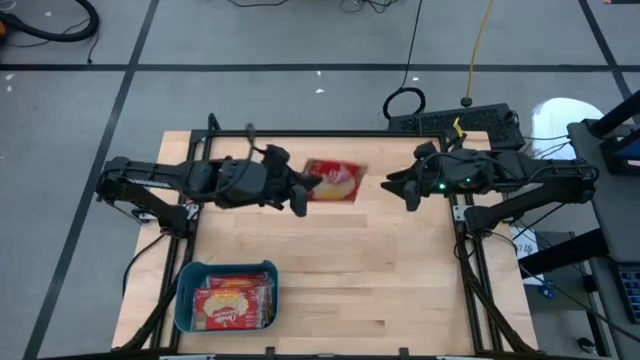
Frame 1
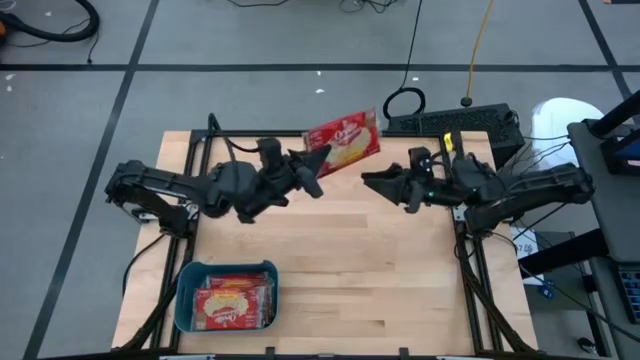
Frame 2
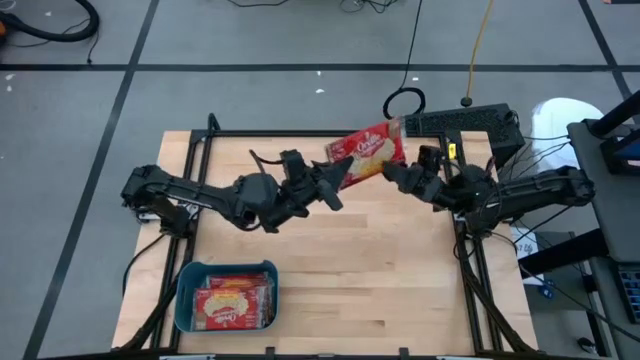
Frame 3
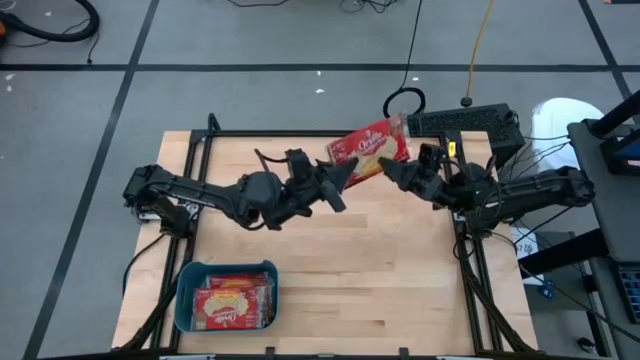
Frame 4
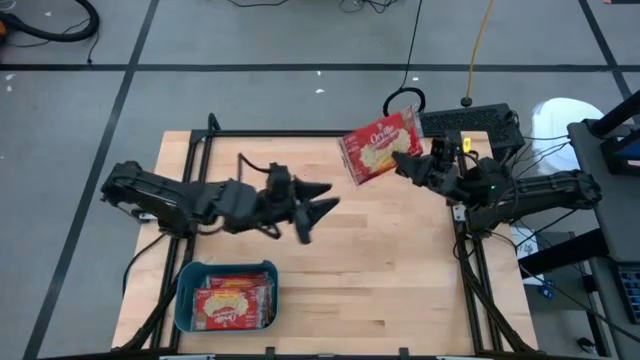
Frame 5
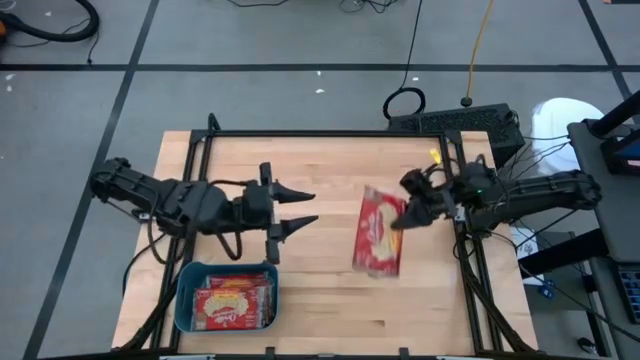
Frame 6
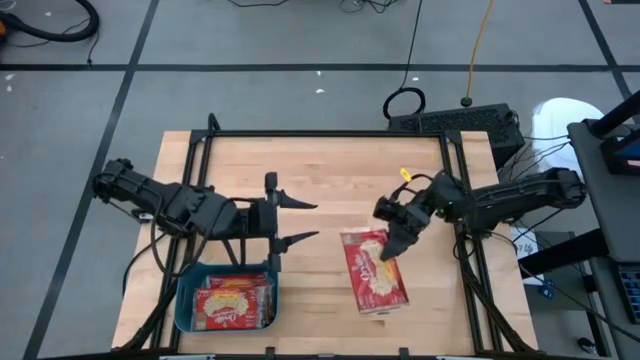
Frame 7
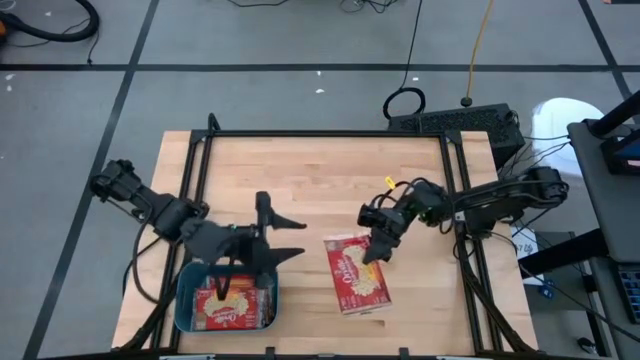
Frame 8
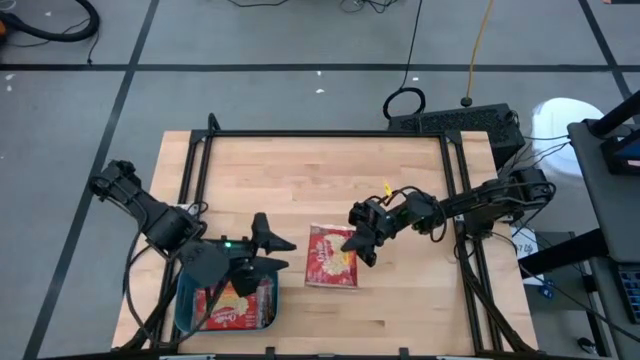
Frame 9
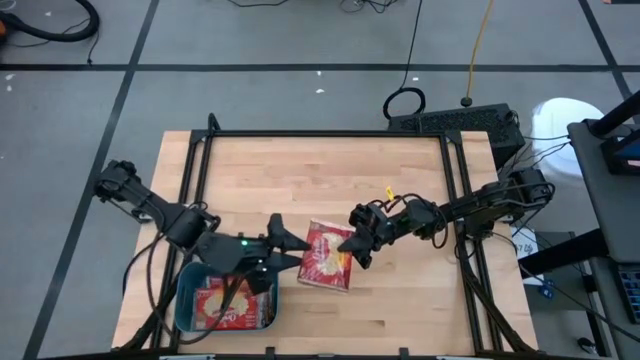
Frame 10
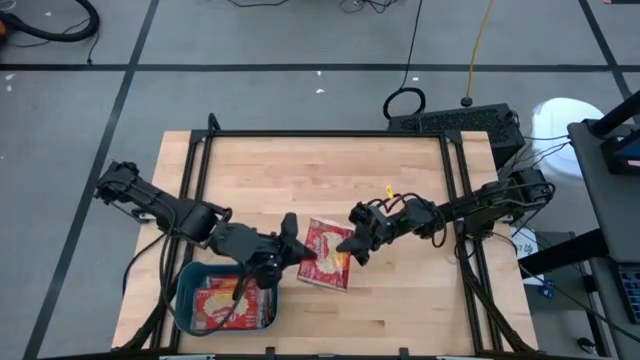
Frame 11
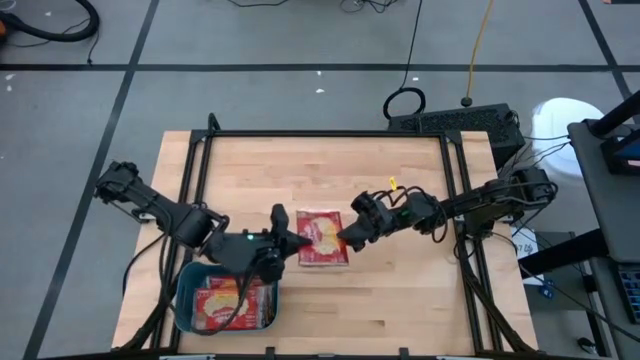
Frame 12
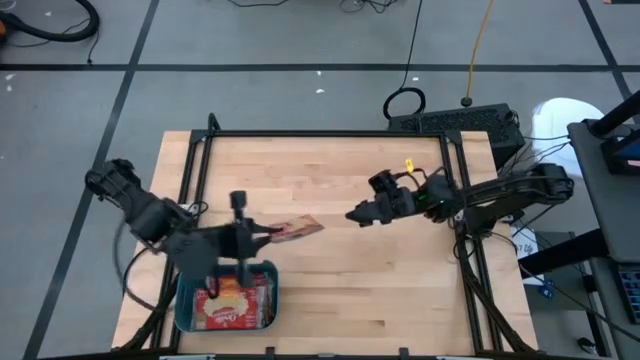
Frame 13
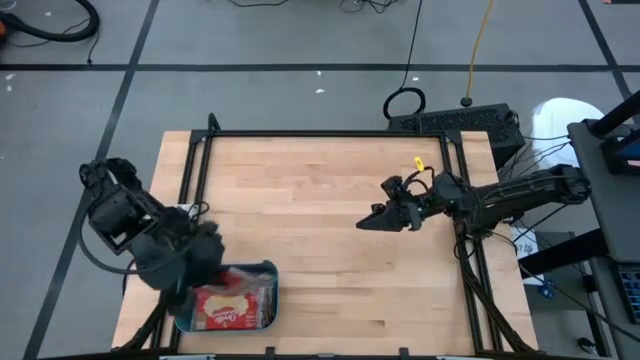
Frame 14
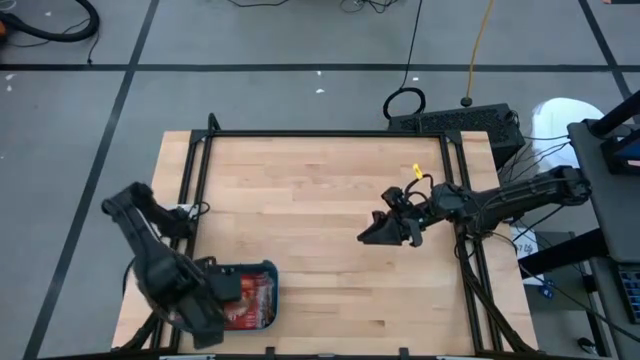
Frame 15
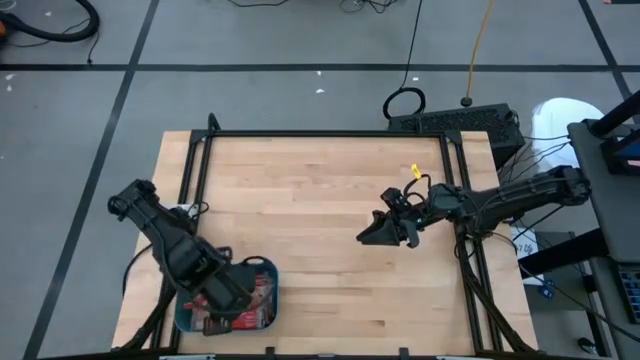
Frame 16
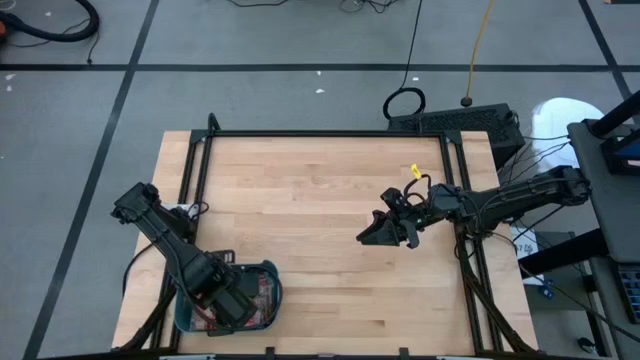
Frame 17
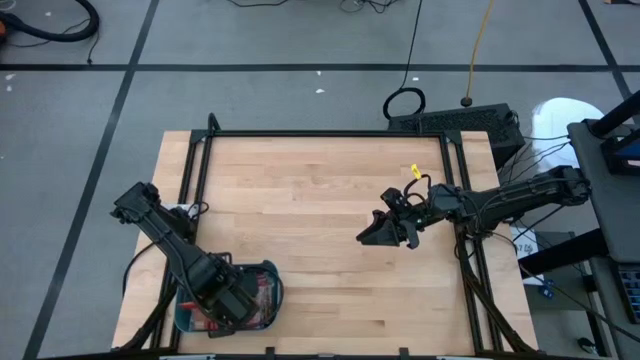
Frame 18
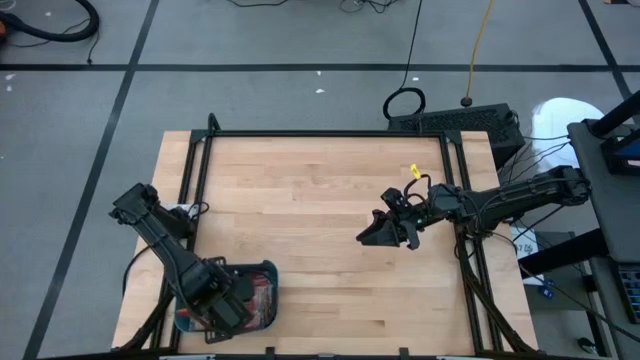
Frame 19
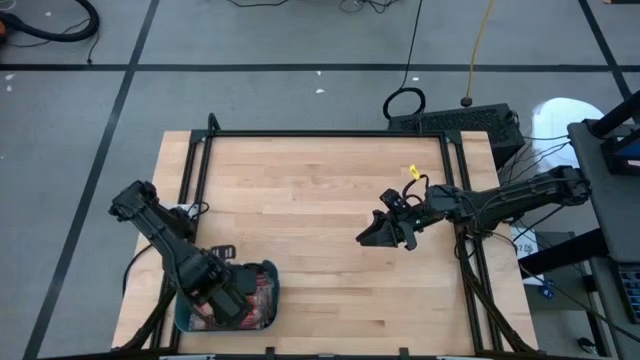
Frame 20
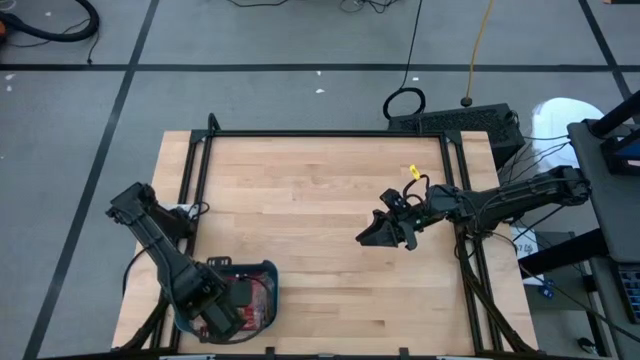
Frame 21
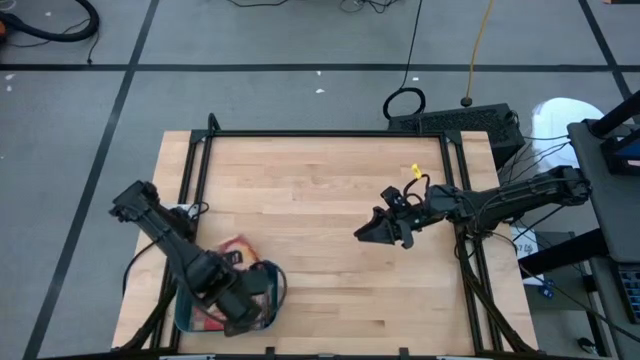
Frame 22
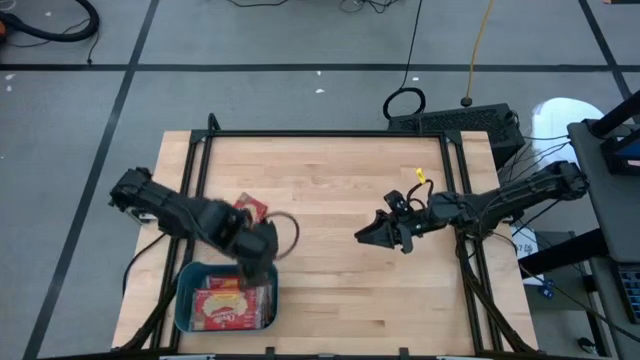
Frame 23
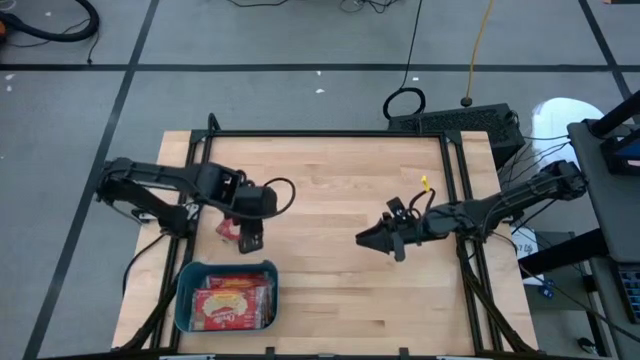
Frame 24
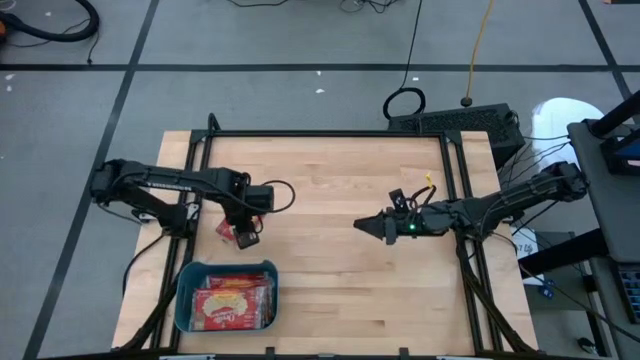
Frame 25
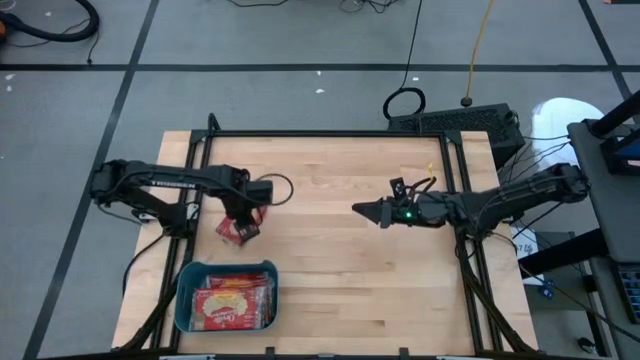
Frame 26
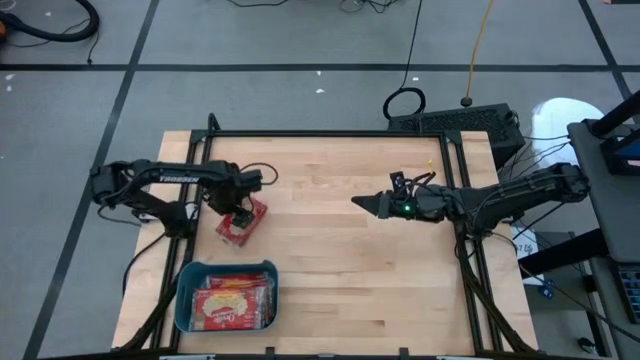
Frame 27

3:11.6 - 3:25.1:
Task: Sort popcorn bags into baskets
Put the popcorn sachet into the bin

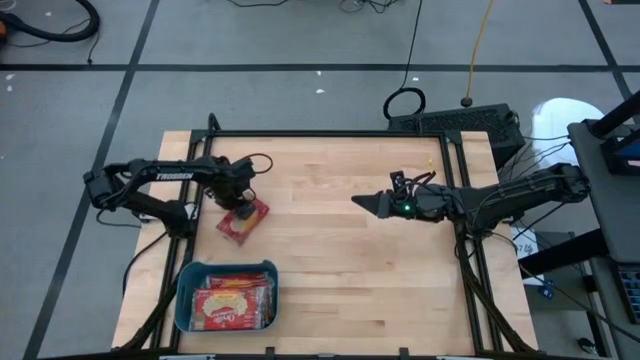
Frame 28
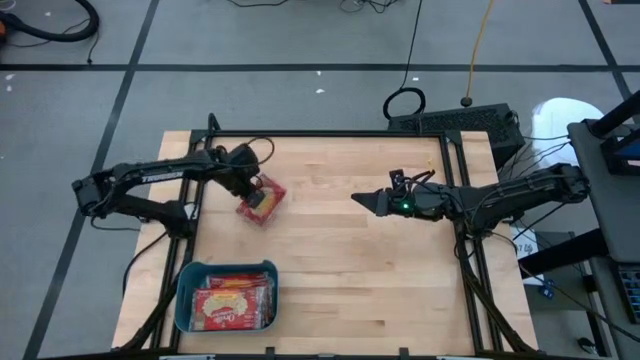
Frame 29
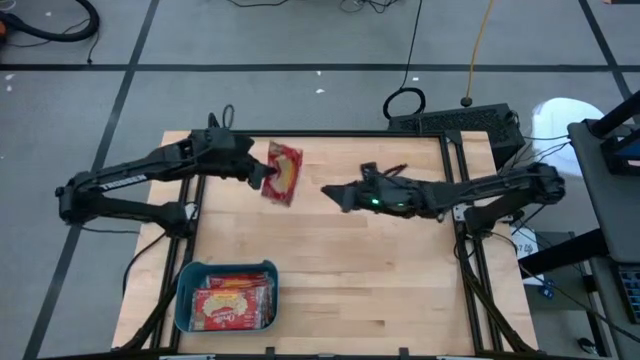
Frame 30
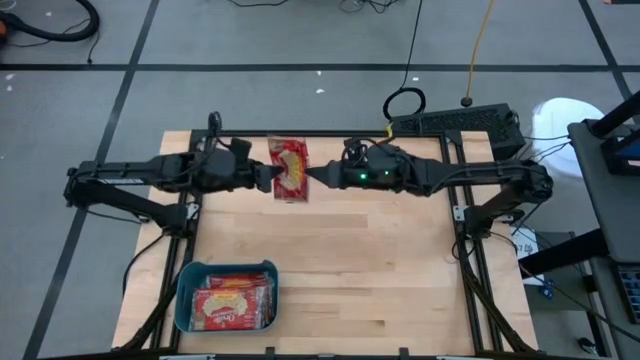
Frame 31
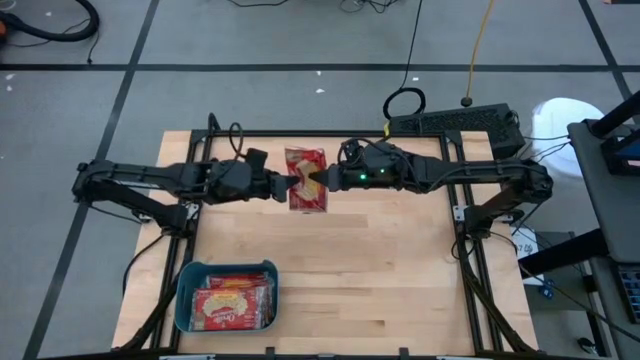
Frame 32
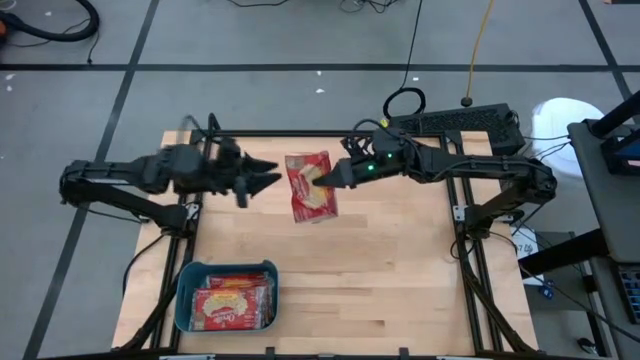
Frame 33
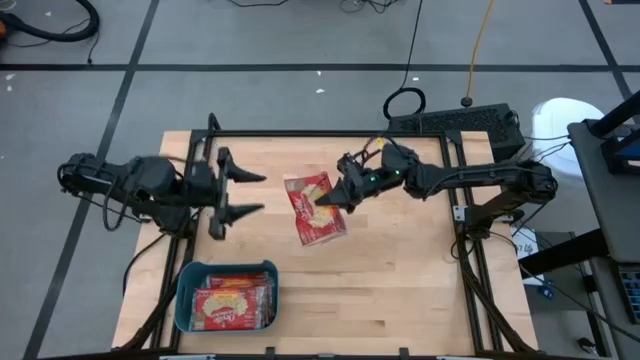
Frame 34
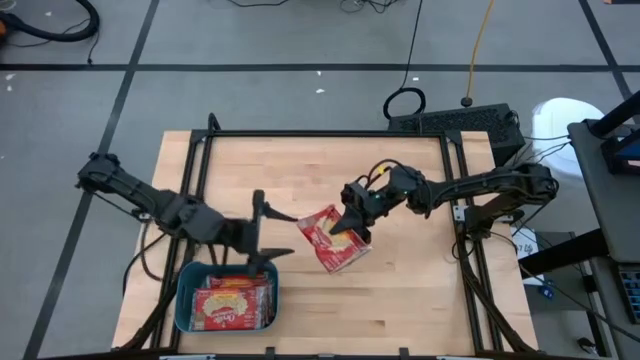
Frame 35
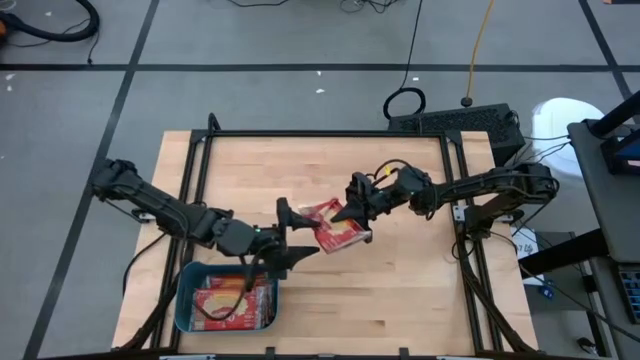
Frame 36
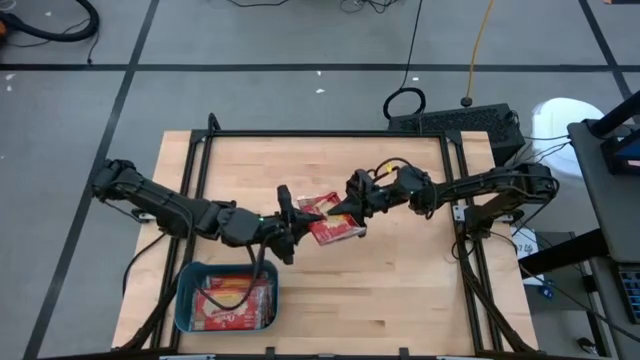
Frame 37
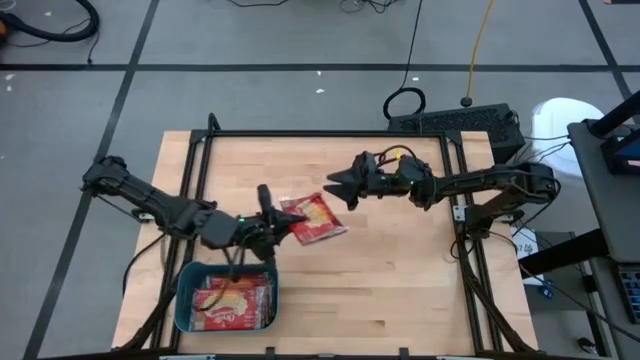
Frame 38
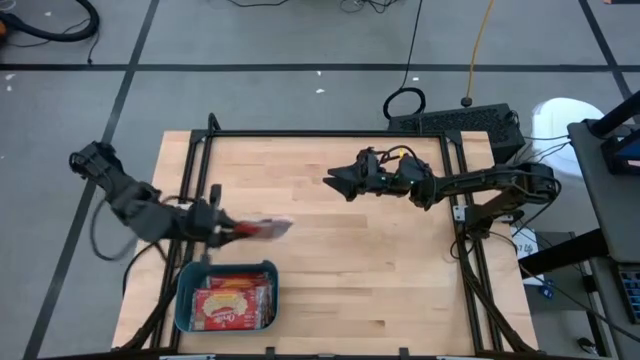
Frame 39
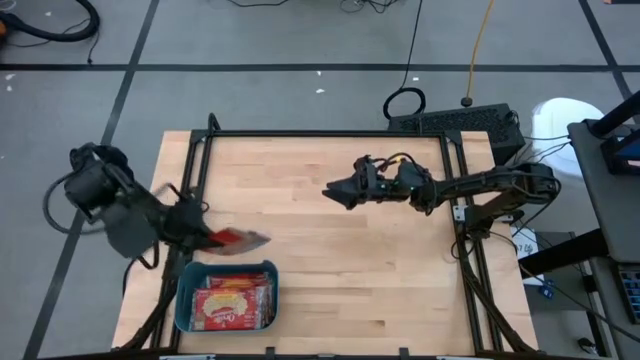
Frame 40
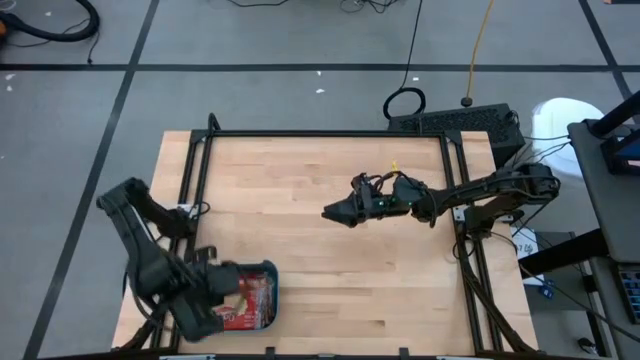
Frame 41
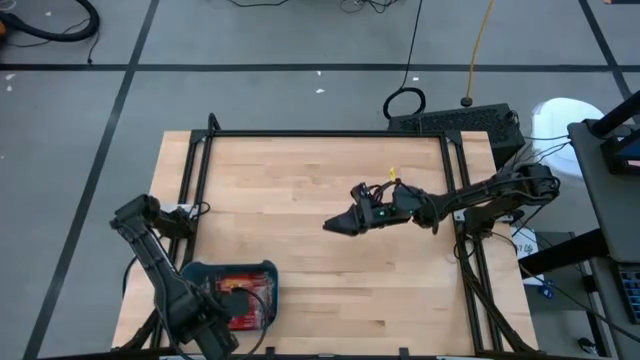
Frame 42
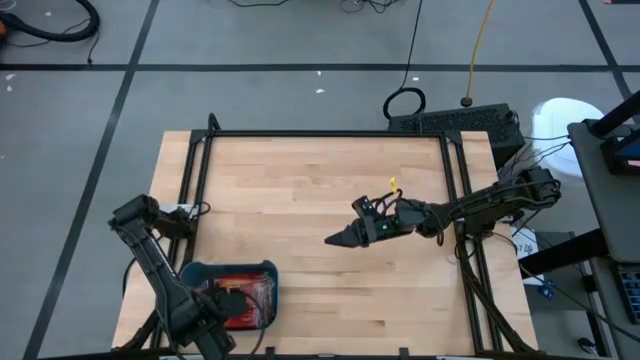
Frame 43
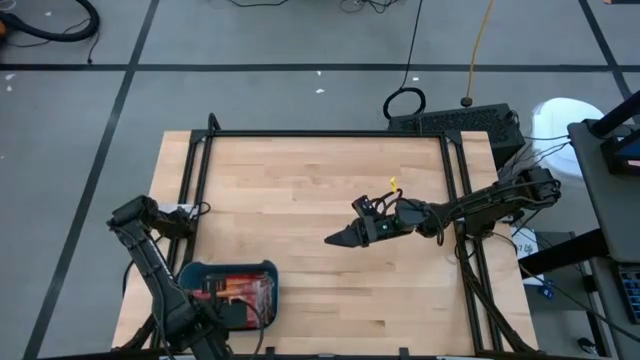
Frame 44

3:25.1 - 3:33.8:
Put the popcorn sachet into the bin
